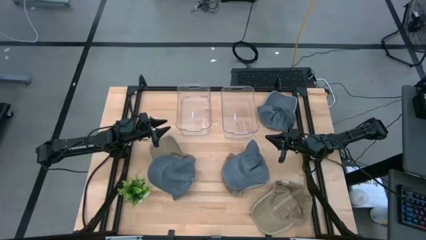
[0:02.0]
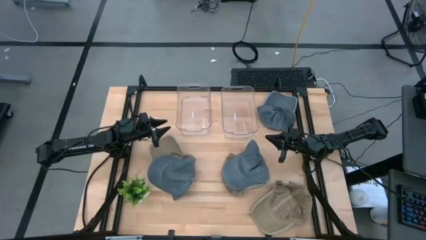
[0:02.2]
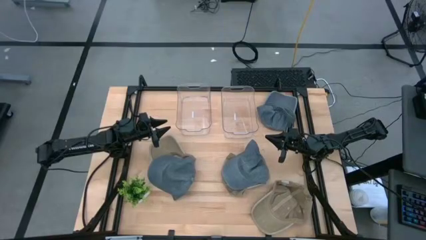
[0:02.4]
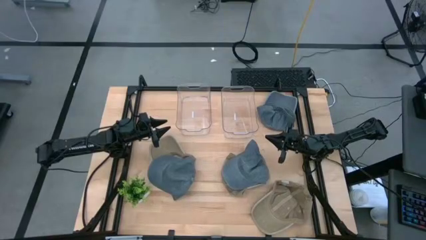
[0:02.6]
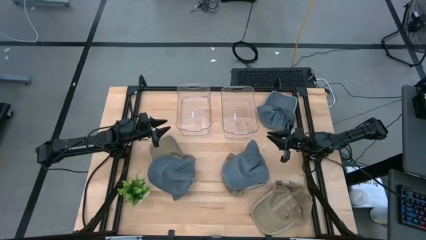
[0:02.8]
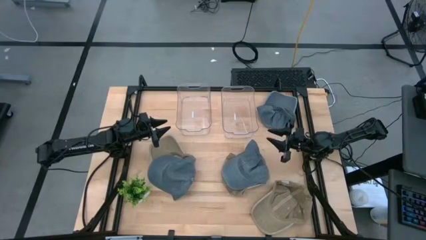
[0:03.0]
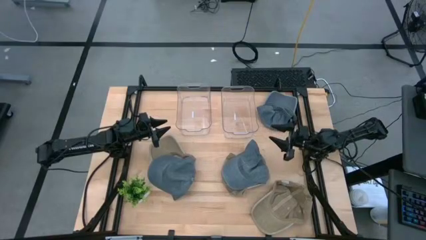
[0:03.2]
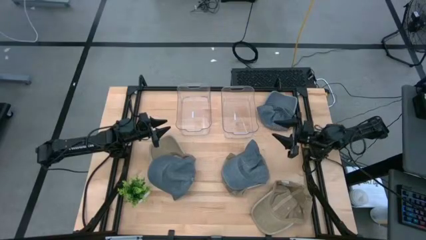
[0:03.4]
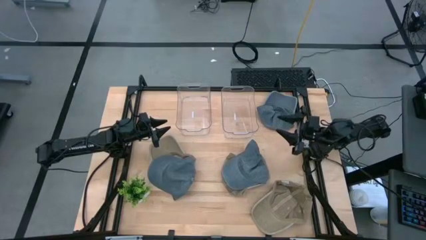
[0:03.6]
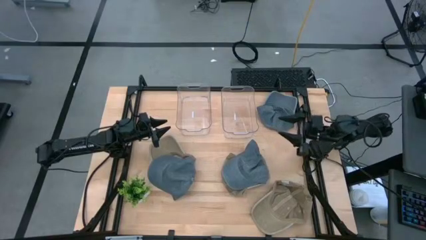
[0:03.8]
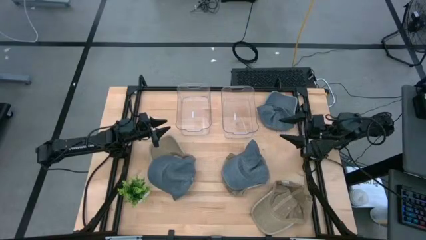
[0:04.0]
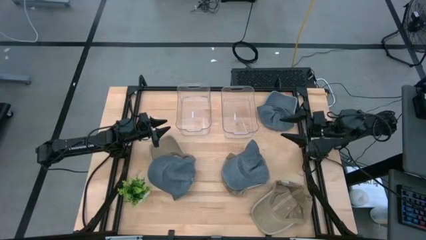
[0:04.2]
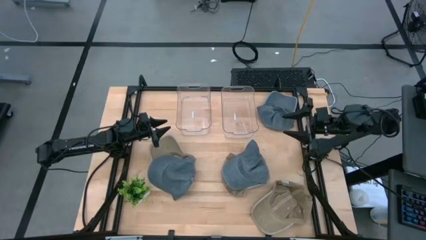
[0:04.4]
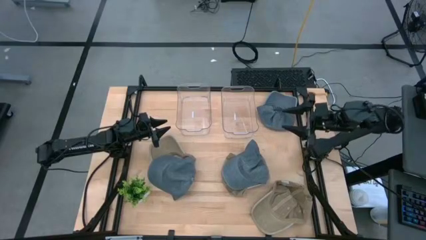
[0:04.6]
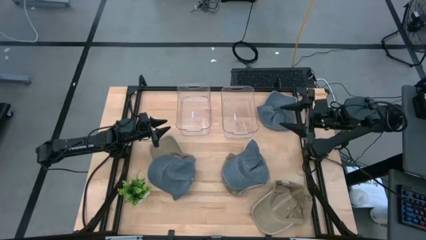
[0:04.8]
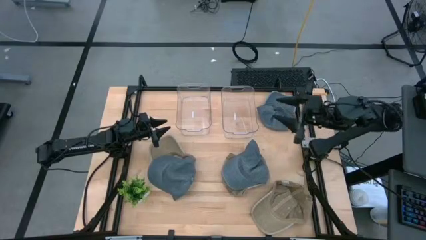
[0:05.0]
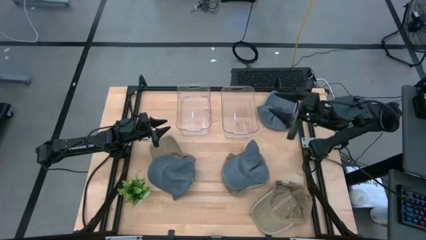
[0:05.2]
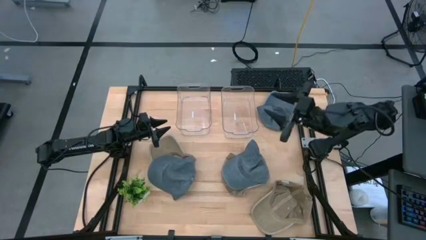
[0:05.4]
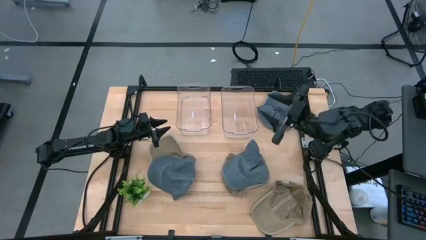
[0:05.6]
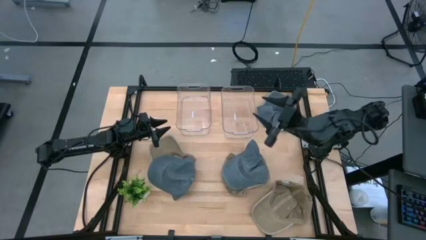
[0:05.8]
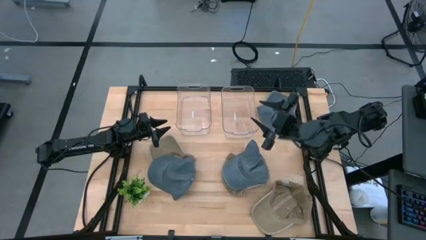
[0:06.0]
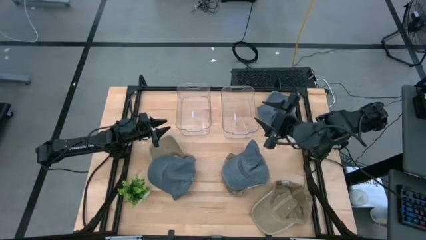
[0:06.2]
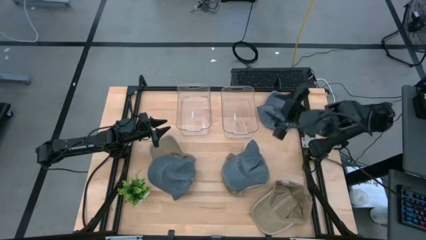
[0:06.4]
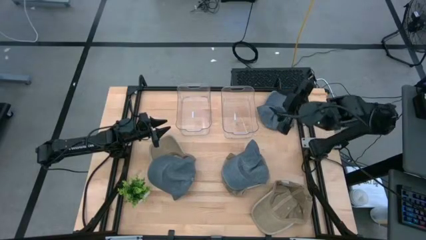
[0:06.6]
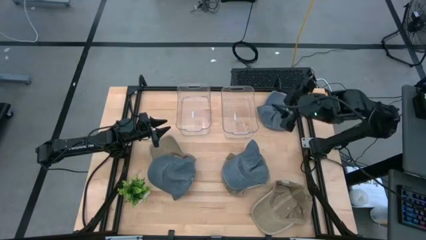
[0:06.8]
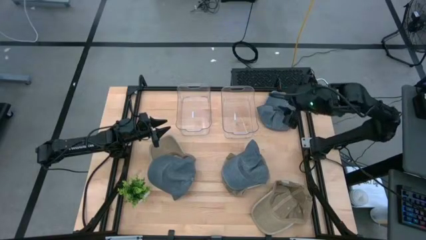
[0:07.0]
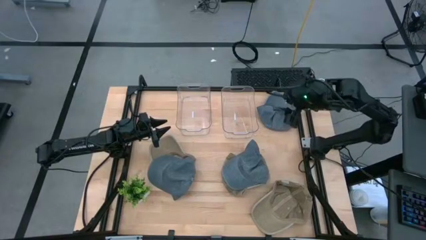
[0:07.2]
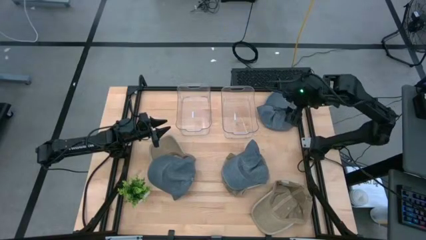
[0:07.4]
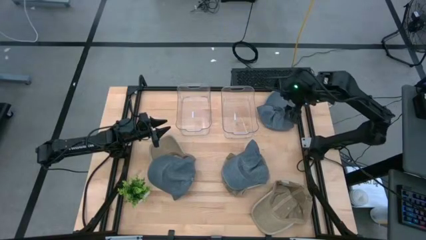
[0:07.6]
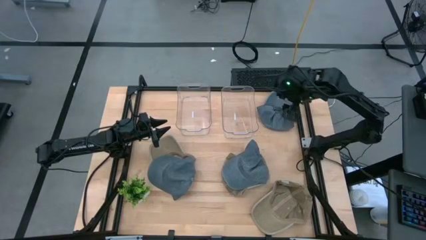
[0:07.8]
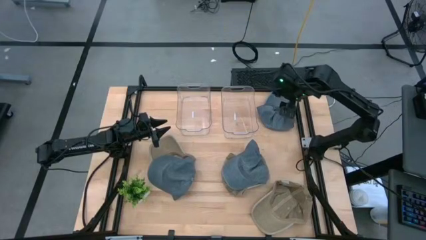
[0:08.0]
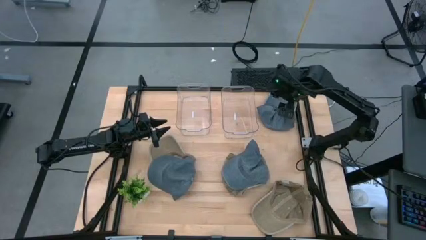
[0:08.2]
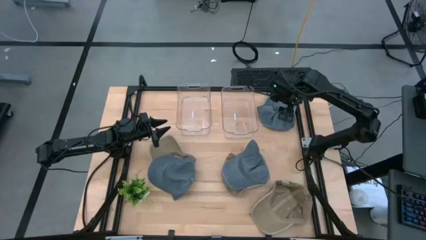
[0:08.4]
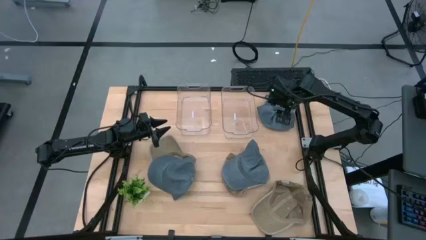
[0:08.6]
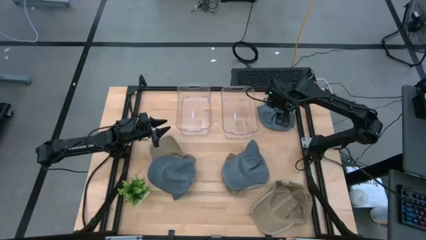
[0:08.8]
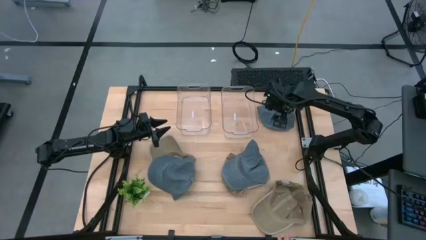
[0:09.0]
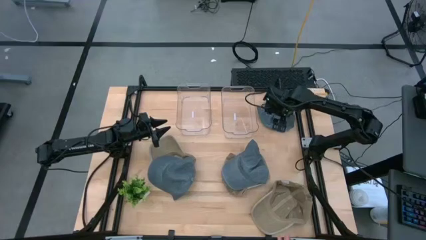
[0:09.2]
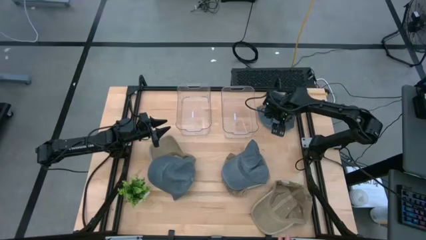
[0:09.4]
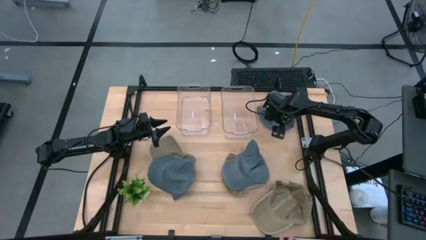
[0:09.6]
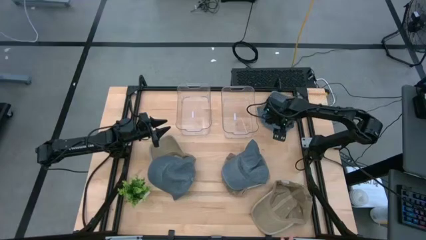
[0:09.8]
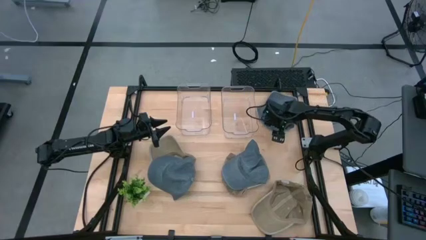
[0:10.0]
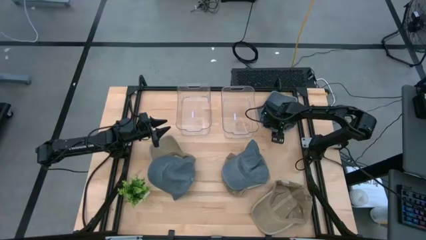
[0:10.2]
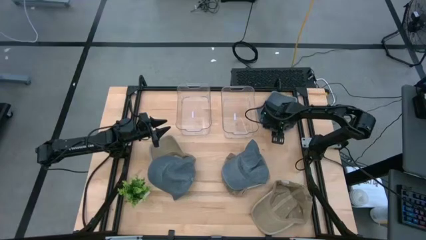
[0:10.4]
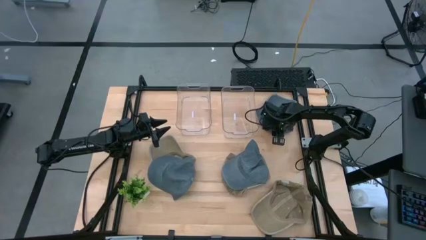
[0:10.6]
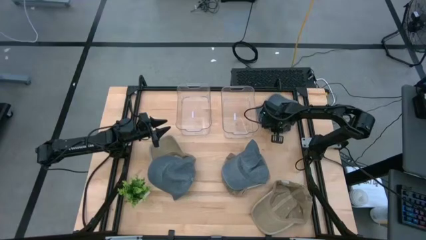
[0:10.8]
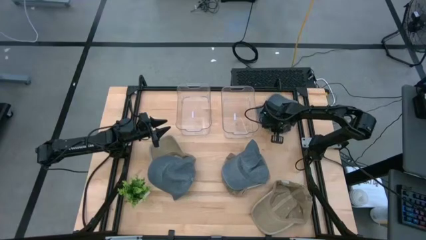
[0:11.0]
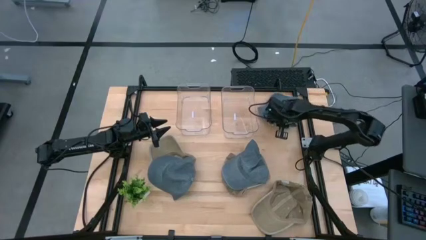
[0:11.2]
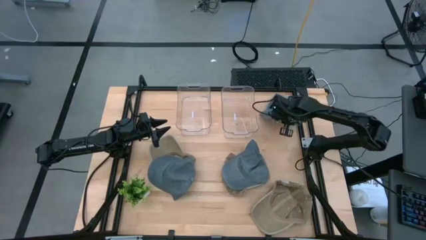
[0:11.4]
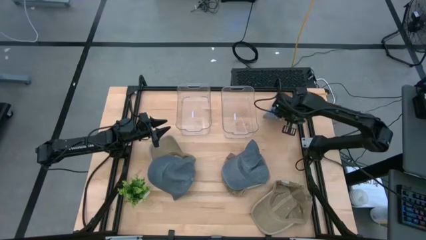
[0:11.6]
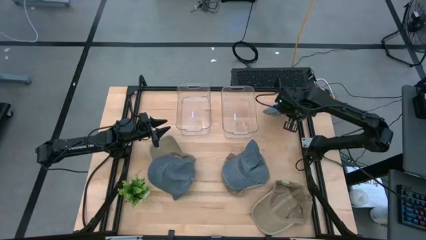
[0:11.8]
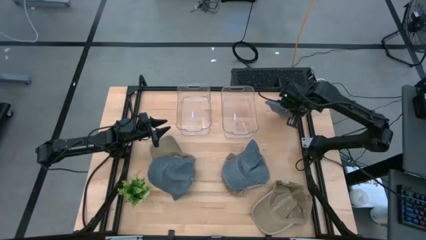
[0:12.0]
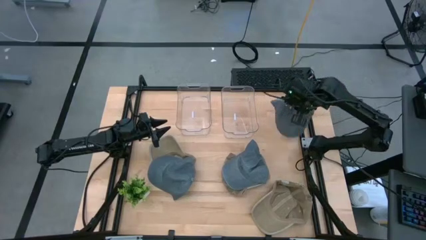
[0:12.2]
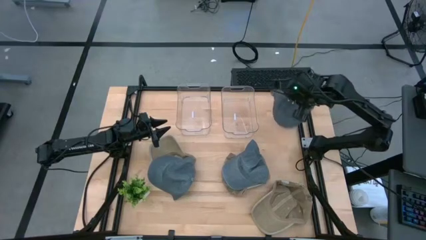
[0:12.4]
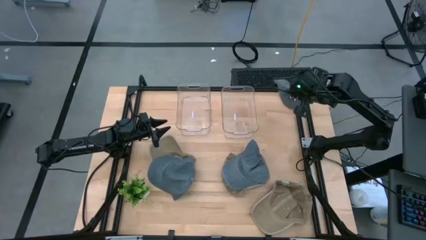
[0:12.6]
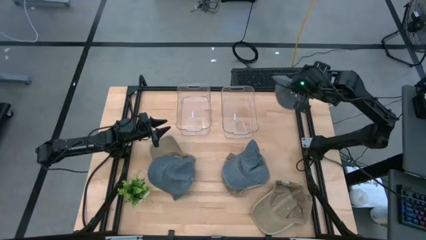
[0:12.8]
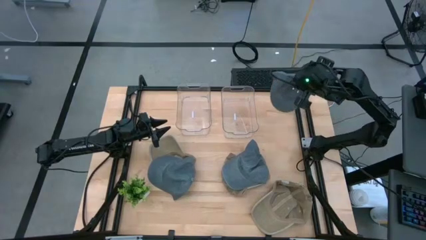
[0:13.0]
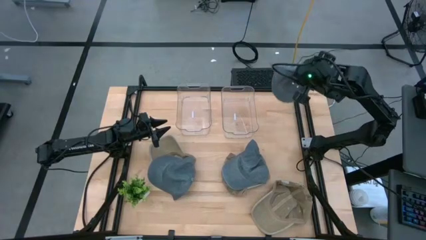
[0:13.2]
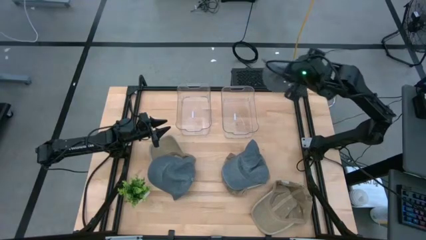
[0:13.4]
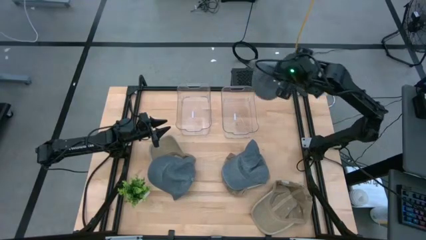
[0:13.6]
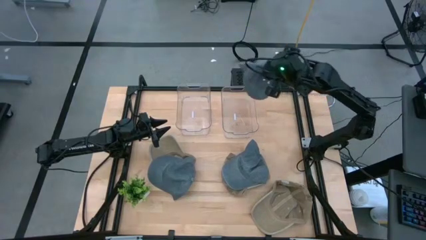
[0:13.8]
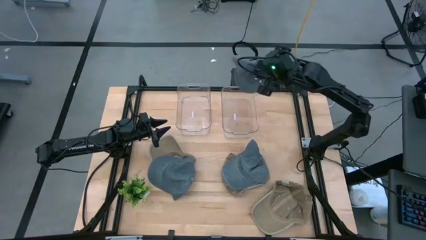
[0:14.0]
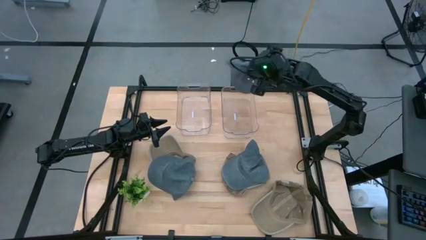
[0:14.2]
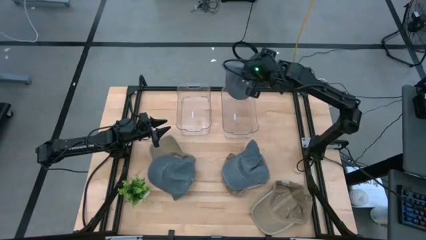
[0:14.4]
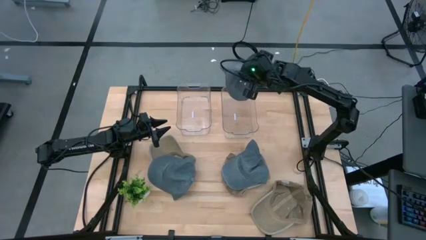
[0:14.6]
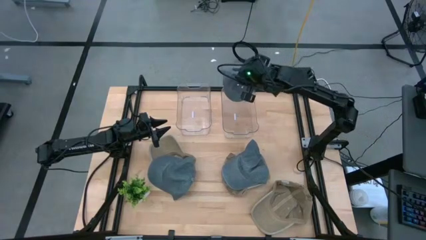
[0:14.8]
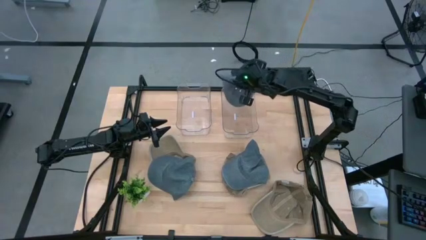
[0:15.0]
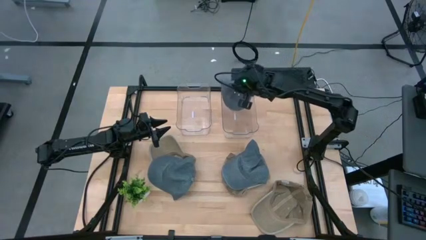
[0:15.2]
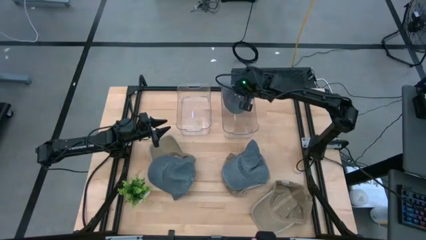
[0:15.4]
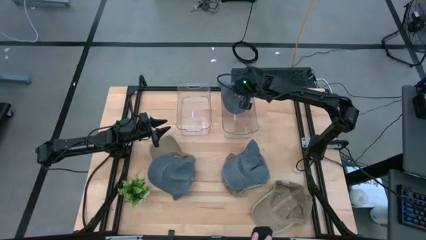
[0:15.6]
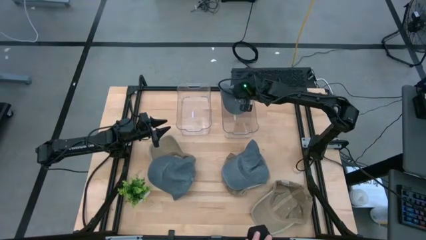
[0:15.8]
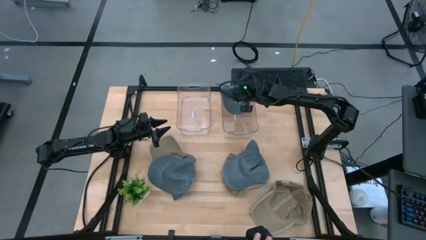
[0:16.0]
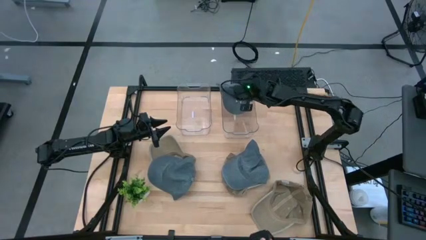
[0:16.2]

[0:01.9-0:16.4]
Task: Pick & Place hat
Put the top right blue cap into the right transparent bin
